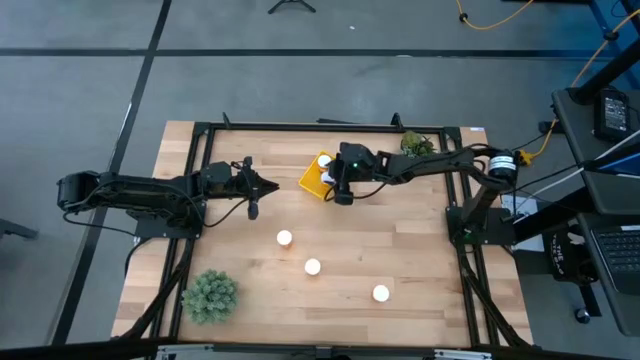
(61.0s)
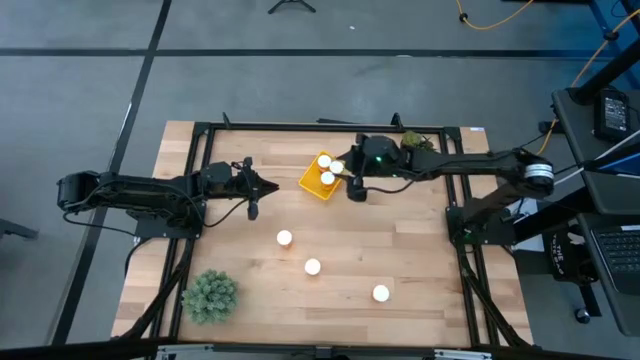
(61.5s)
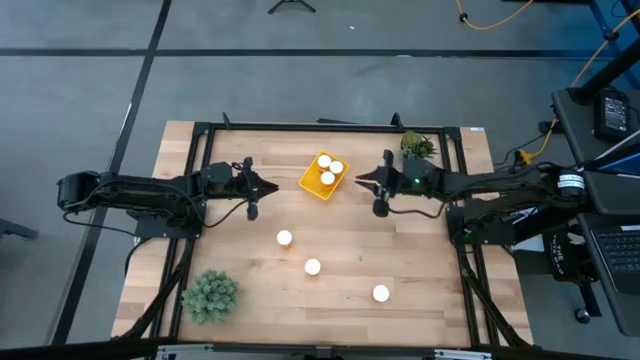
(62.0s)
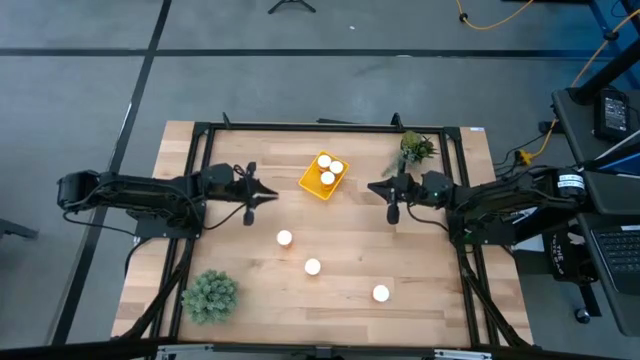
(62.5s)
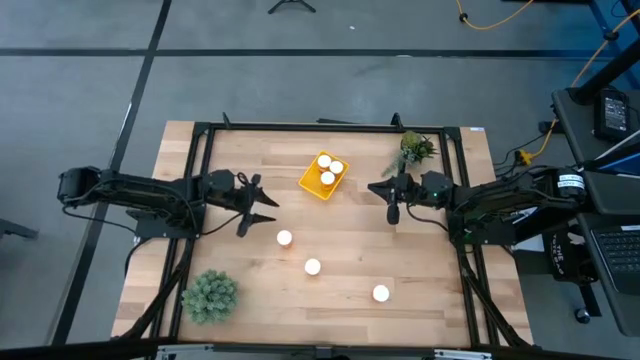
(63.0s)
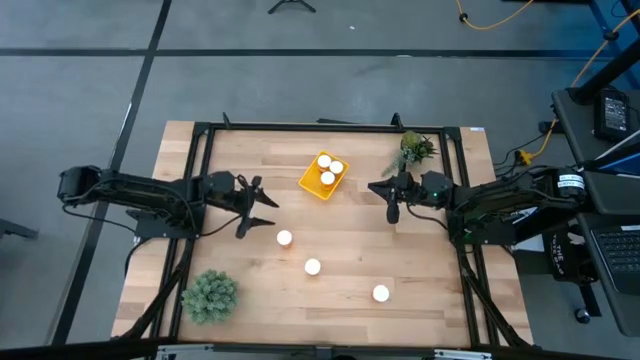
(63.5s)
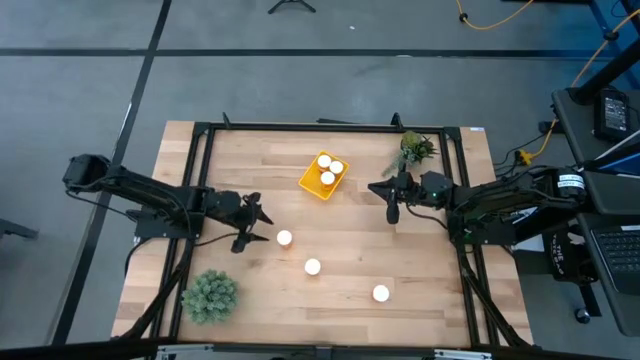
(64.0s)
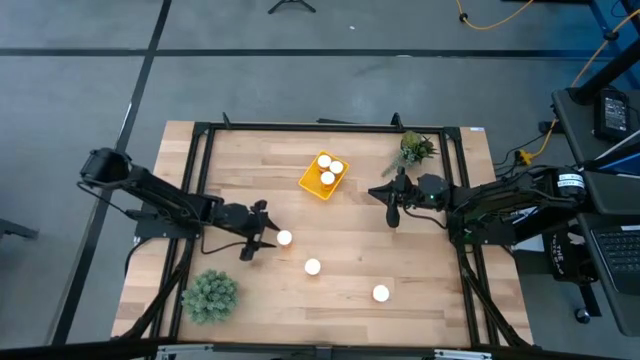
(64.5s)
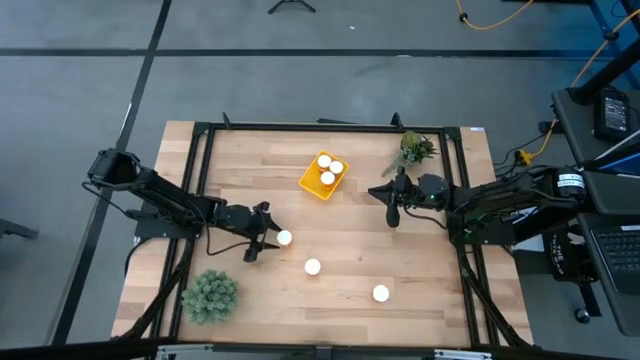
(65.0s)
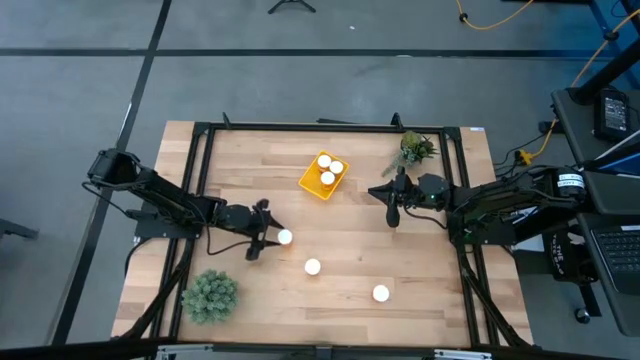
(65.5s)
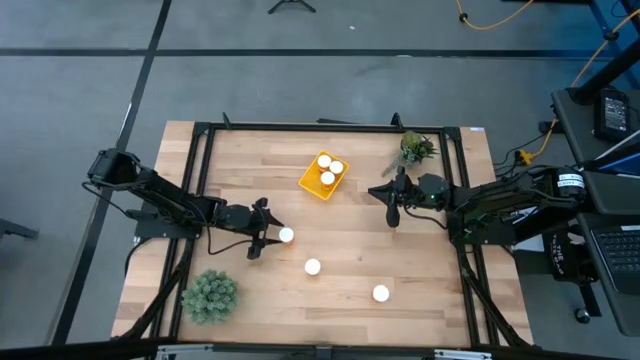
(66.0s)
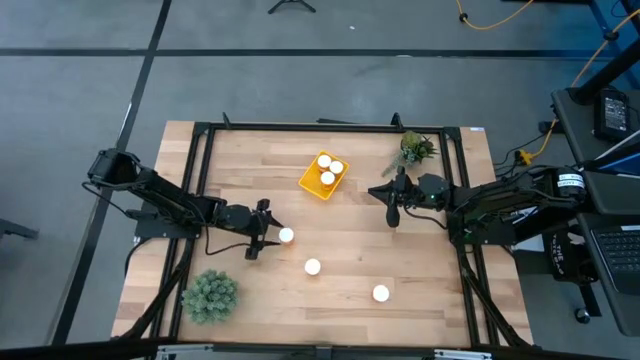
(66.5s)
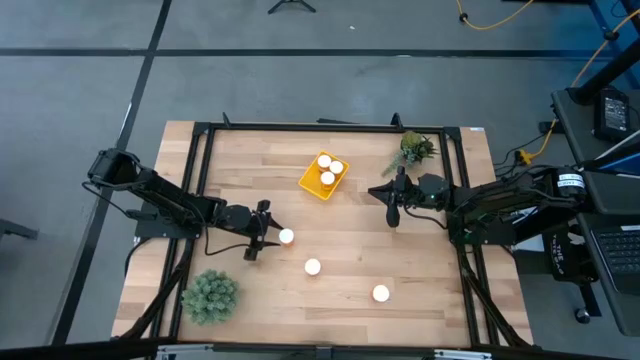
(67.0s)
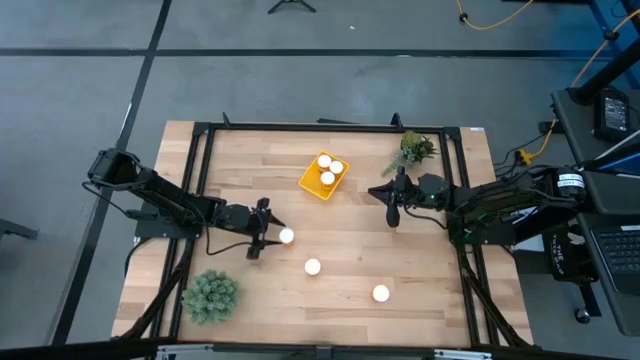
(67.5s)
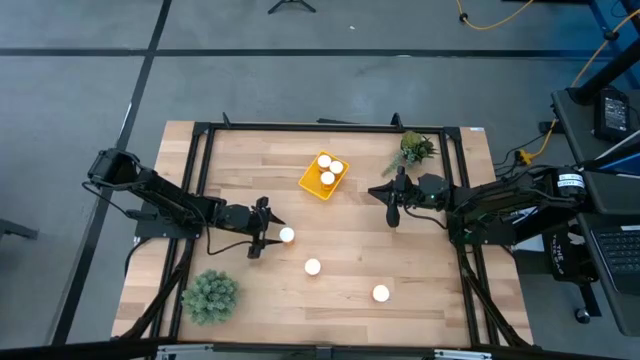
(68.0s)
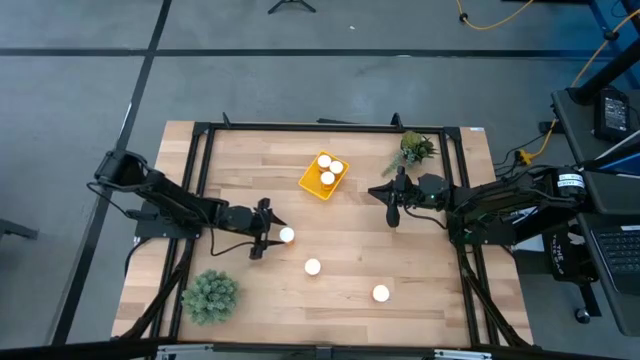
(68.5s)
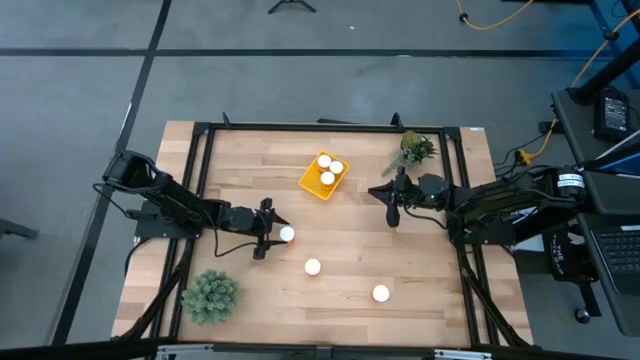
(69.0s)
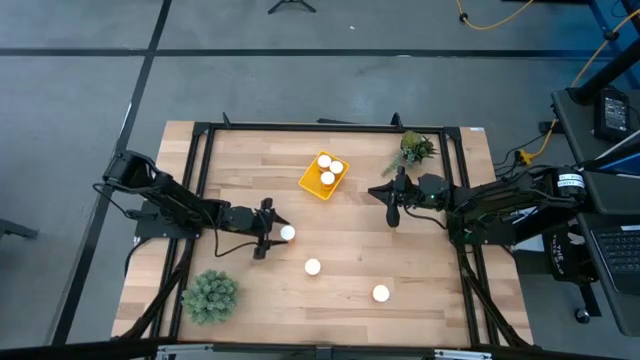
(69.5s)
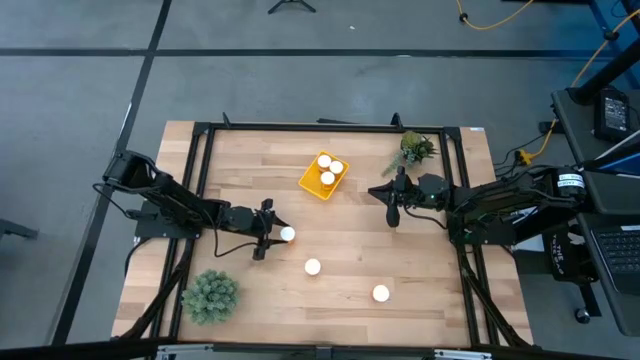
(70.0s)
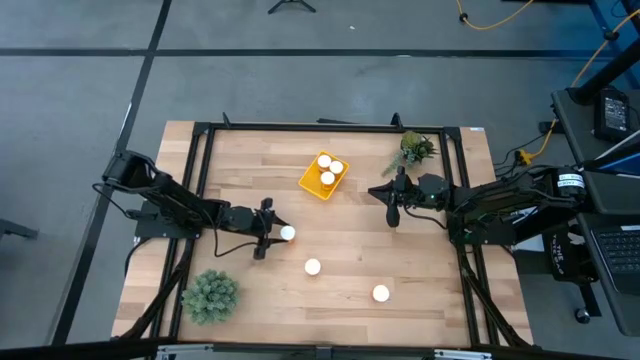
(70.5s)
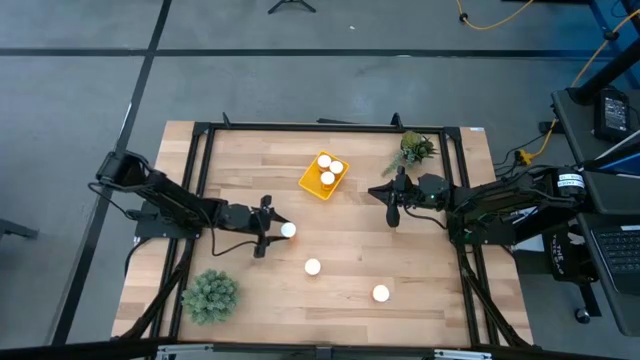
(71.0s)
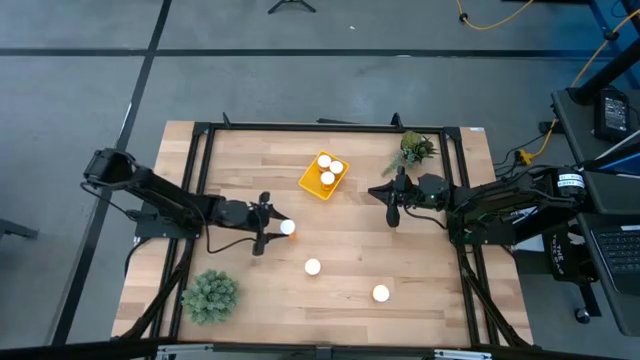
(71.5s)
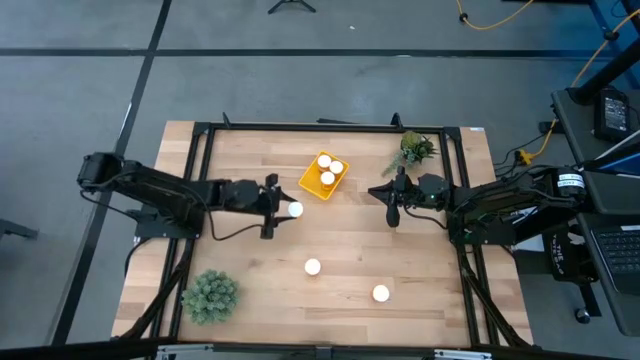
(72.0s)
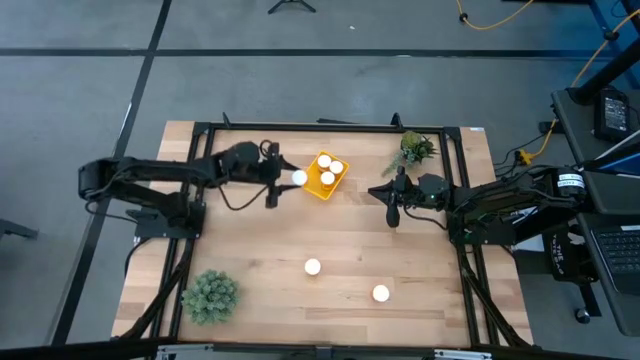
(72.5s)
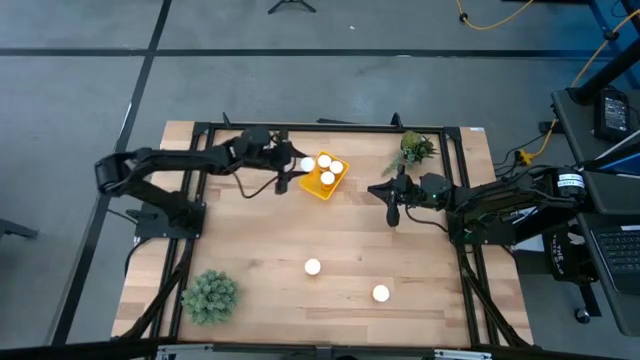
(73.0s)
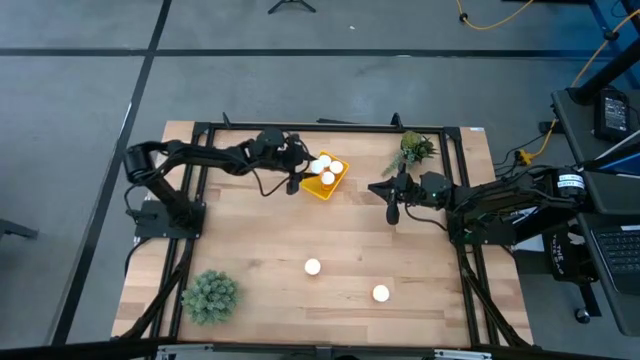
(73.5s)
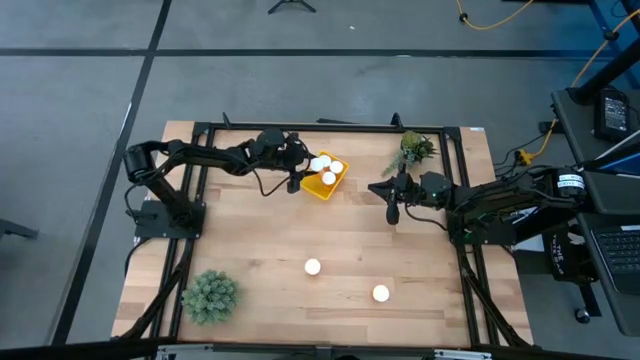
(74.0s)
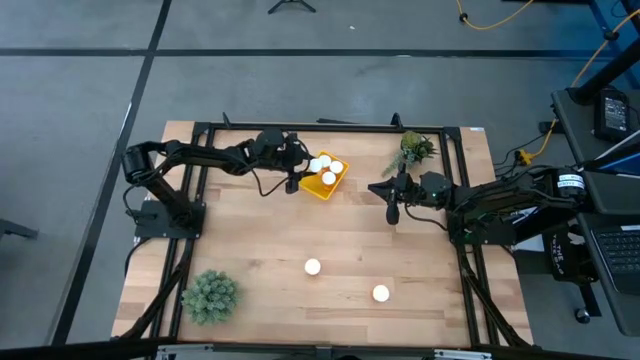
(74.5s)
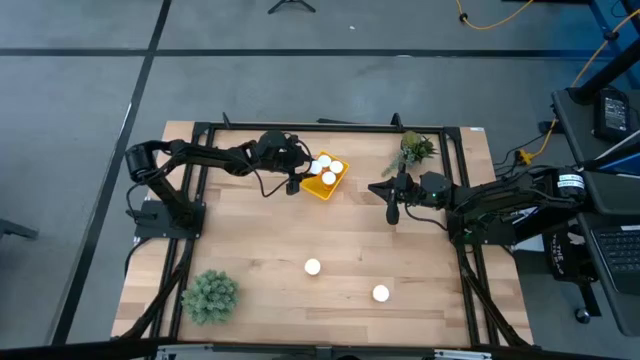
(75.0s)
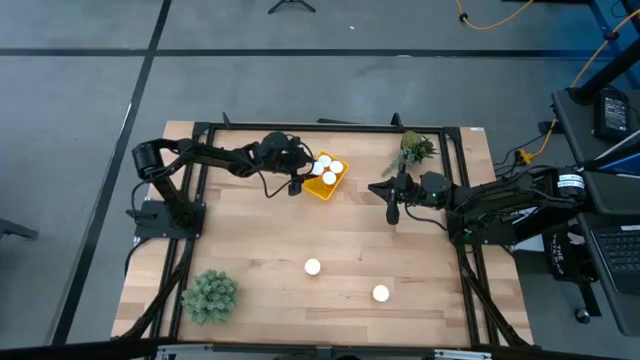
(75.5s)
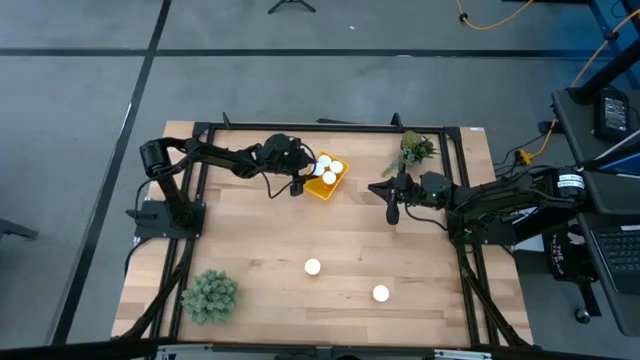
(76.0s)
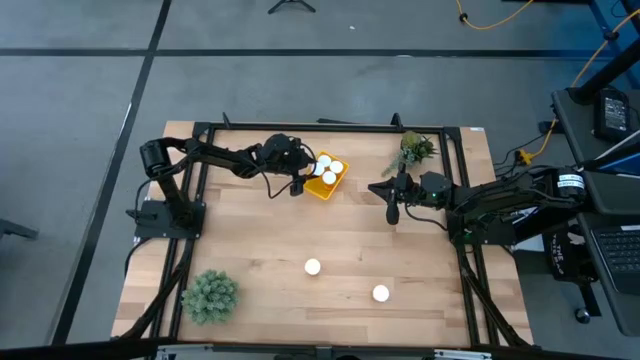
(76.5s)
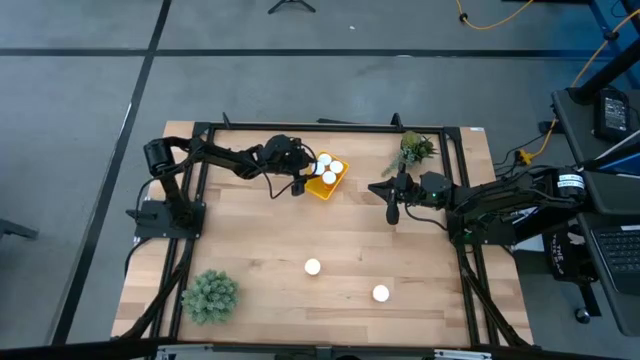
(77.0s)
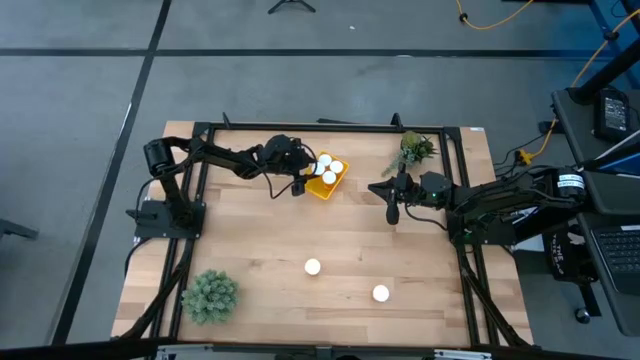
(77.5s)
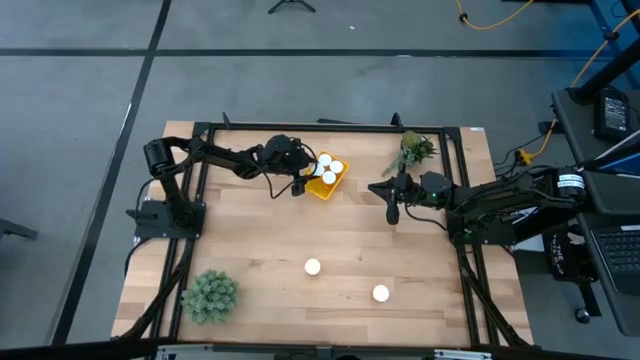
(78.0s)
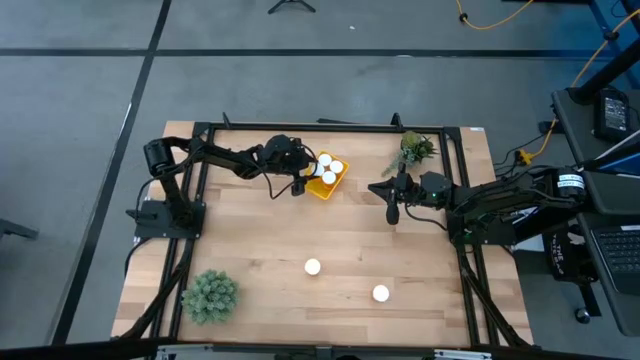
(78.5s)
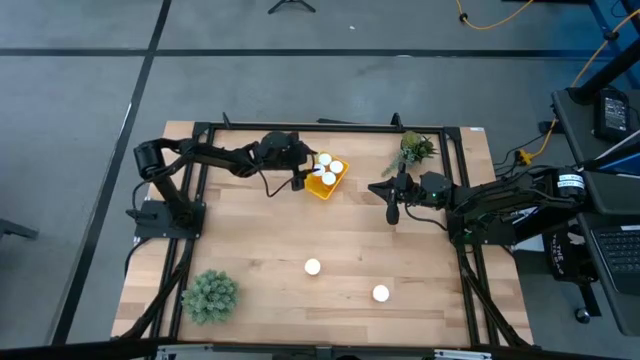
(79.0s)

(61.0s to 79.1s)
Task: Pick and place pill bottles into a basket
Put the top pill bottle into the bin

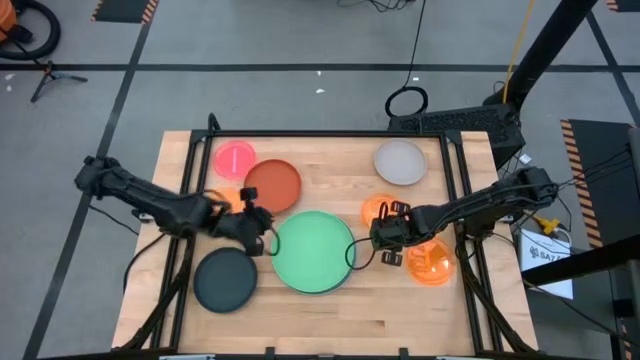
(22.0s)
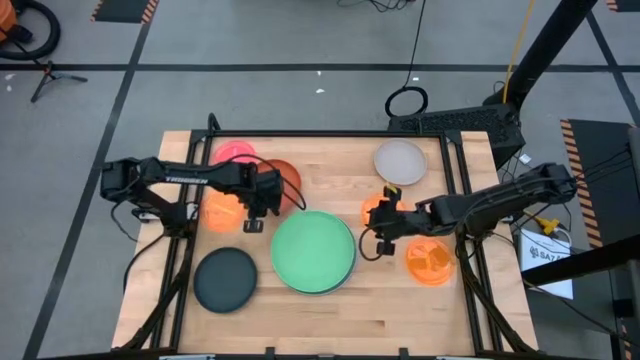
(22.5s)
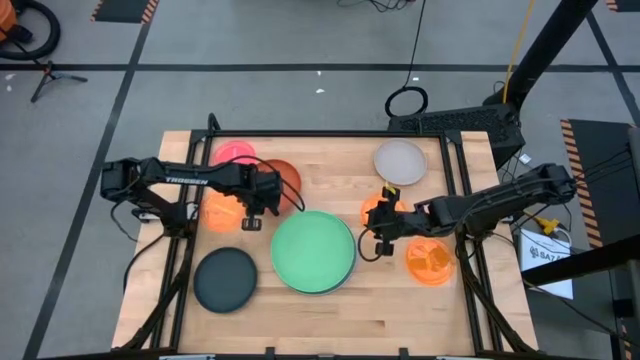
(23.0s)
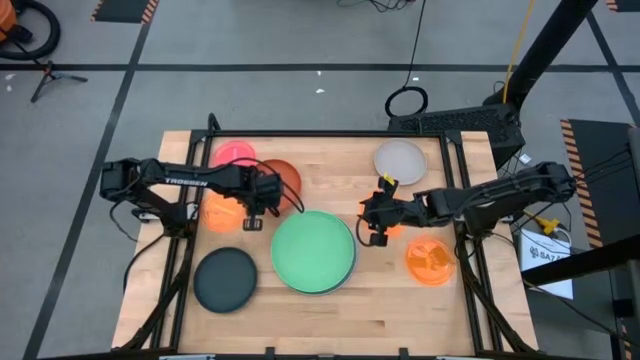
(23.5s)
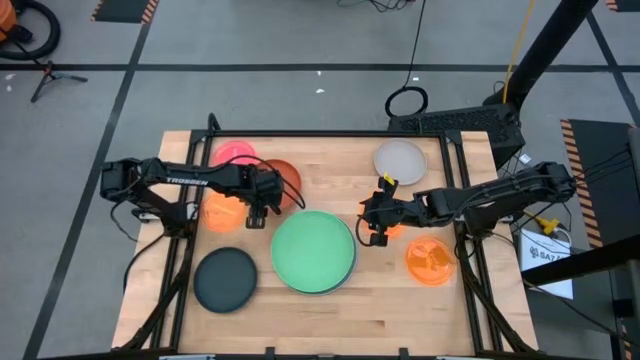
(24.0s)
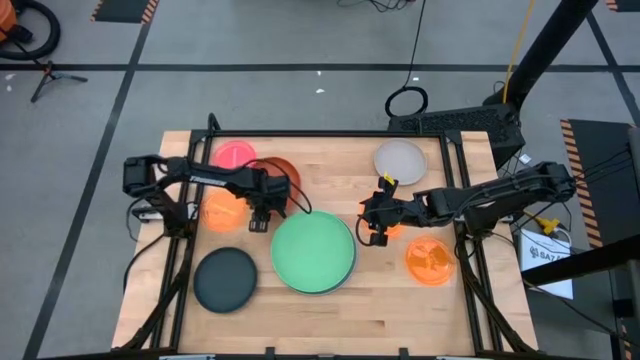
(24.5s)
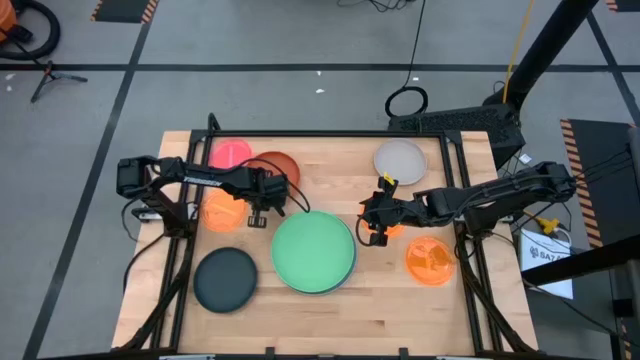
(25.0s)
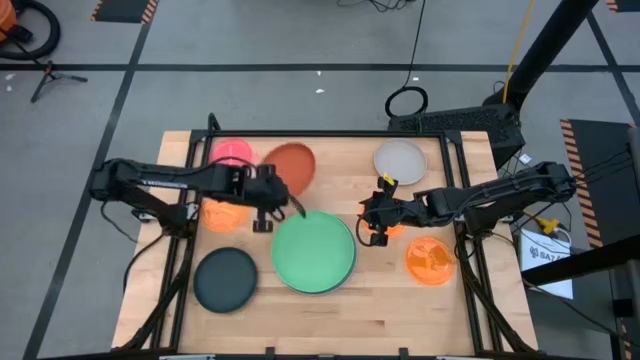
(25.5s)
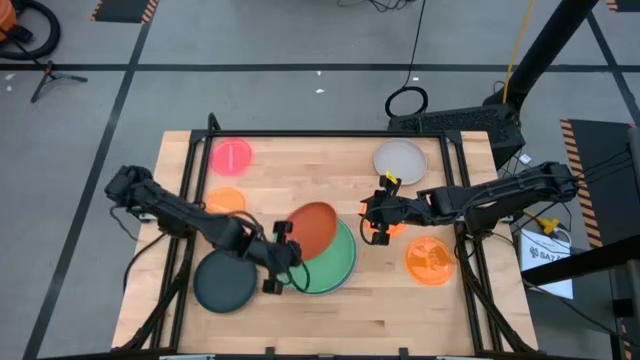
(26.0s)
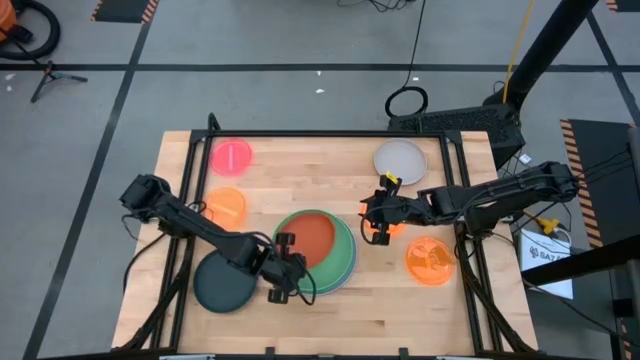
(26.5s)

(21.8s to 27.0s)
Task: Stack plastic plates
Stack the brown plate on the green plate
